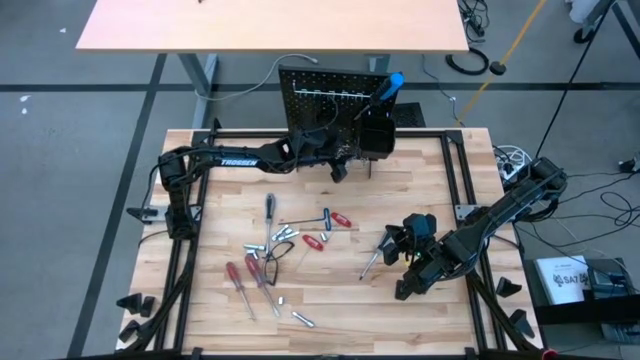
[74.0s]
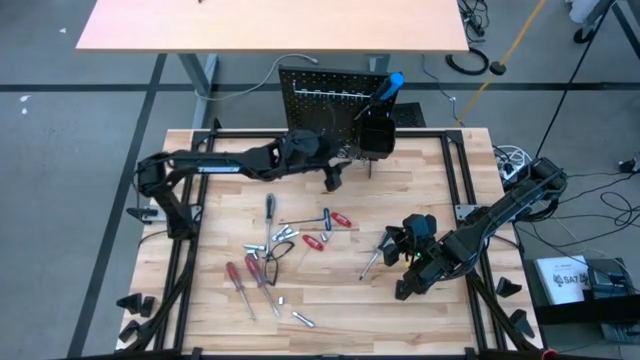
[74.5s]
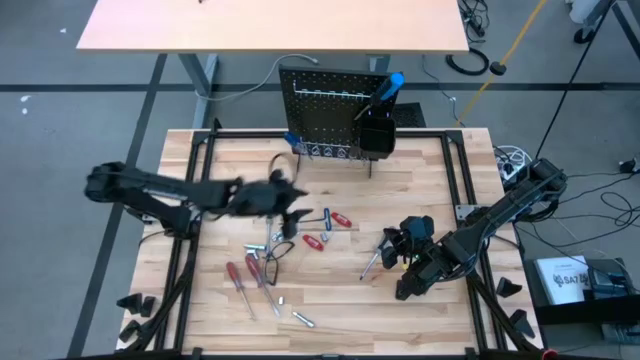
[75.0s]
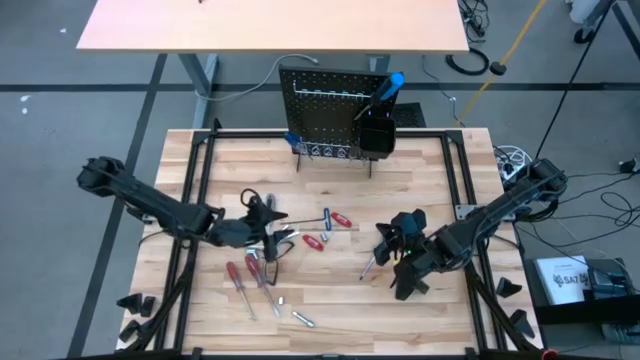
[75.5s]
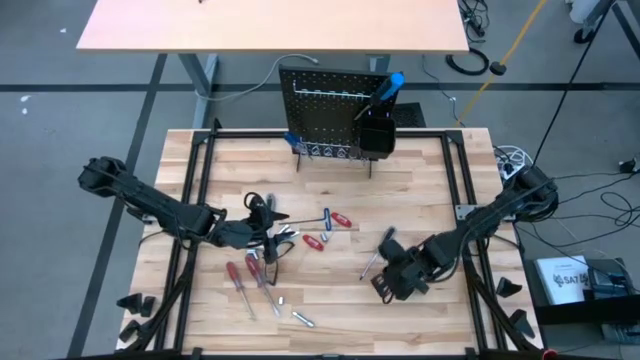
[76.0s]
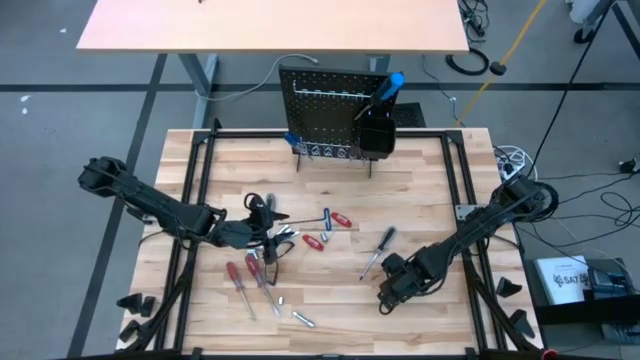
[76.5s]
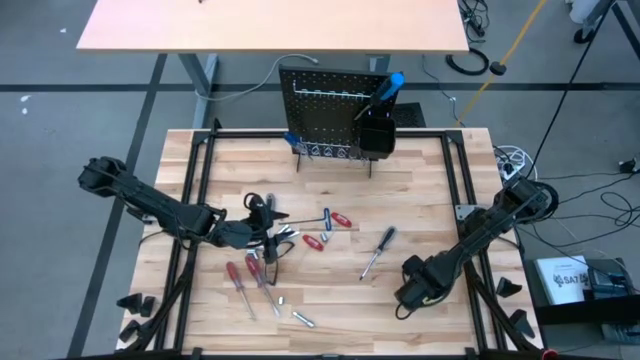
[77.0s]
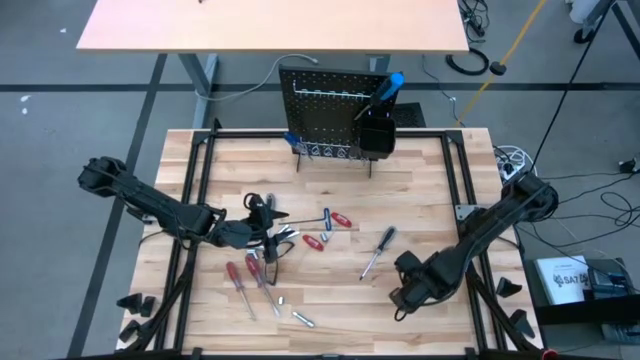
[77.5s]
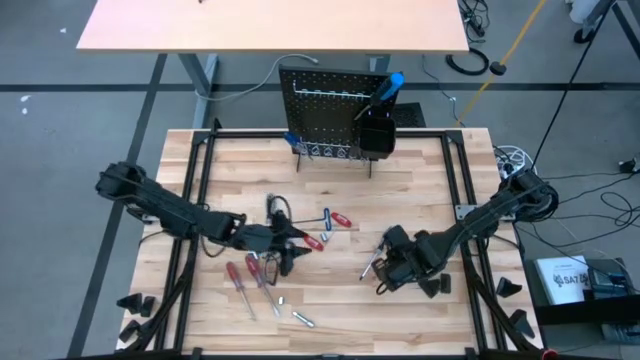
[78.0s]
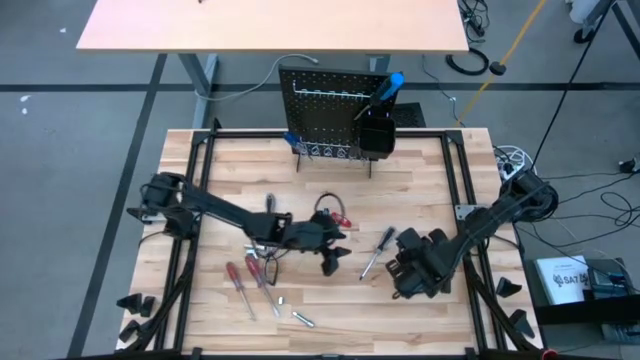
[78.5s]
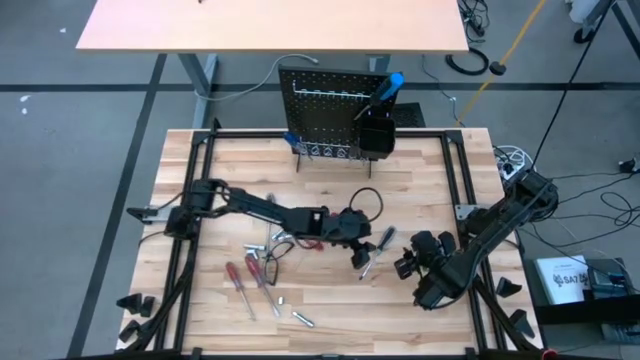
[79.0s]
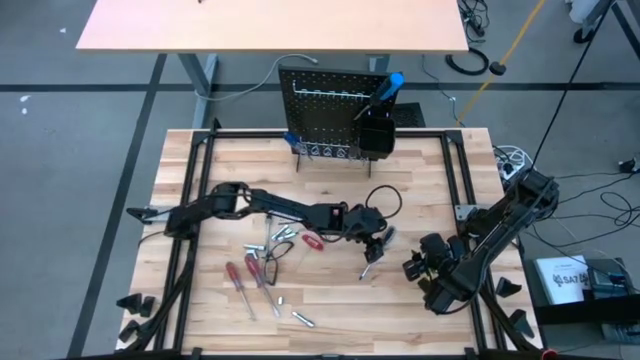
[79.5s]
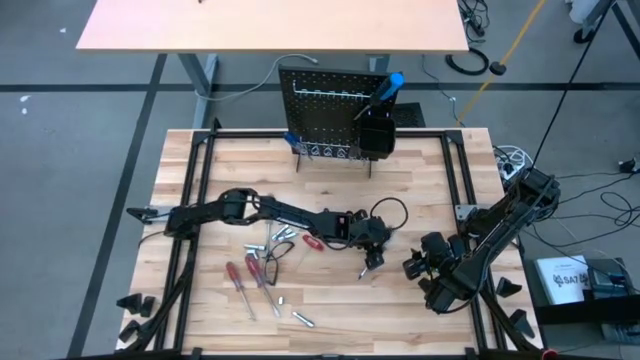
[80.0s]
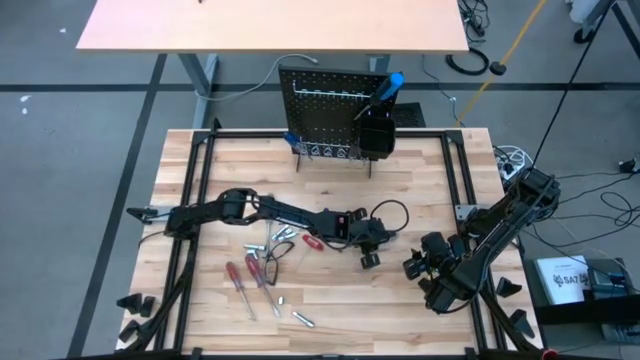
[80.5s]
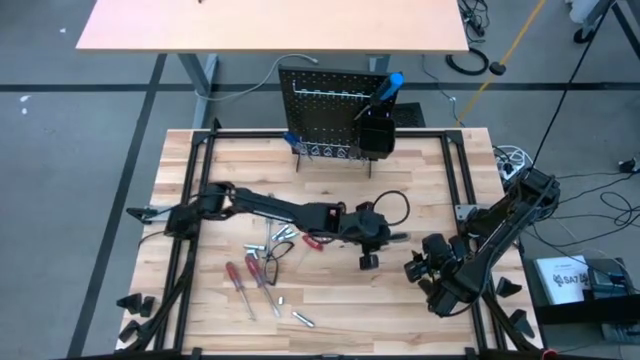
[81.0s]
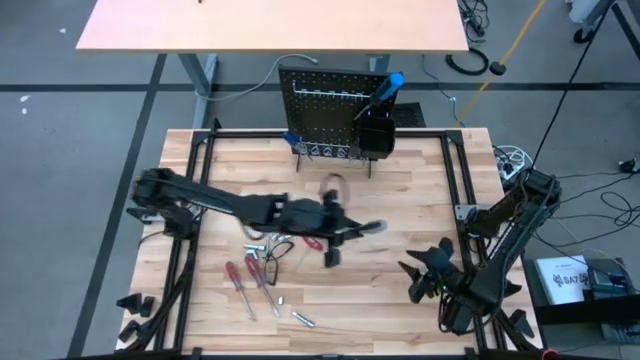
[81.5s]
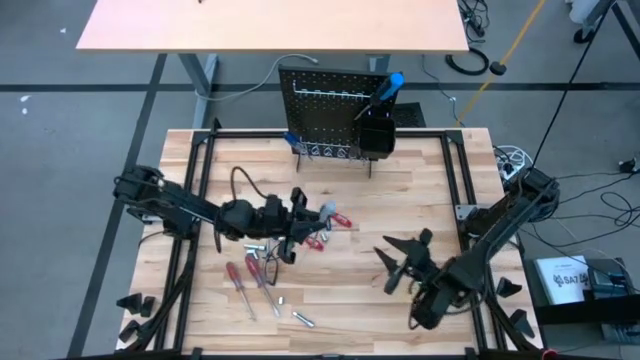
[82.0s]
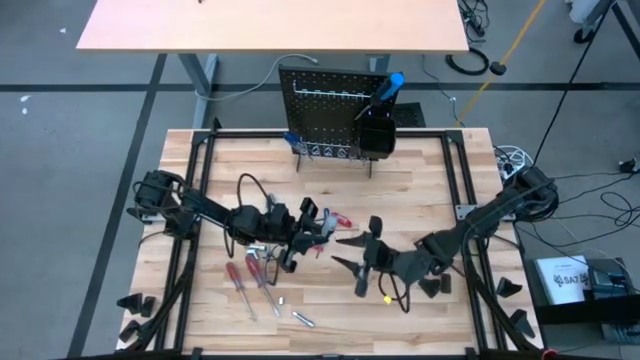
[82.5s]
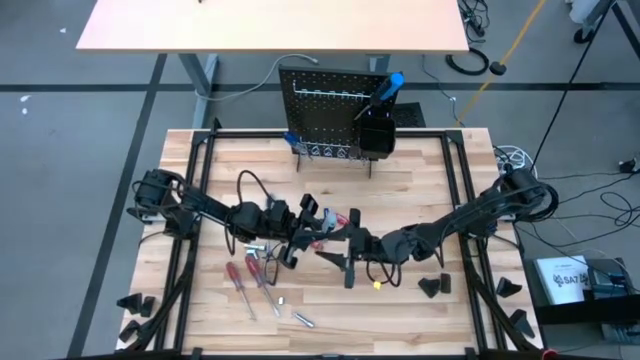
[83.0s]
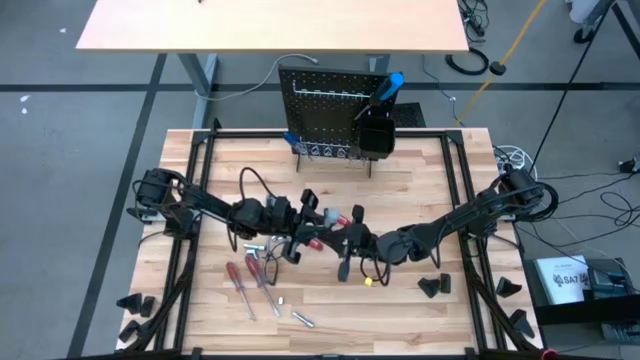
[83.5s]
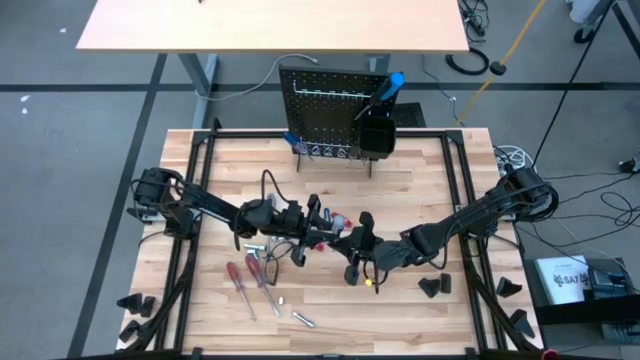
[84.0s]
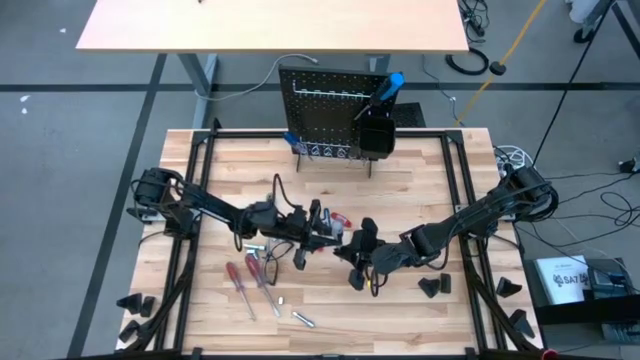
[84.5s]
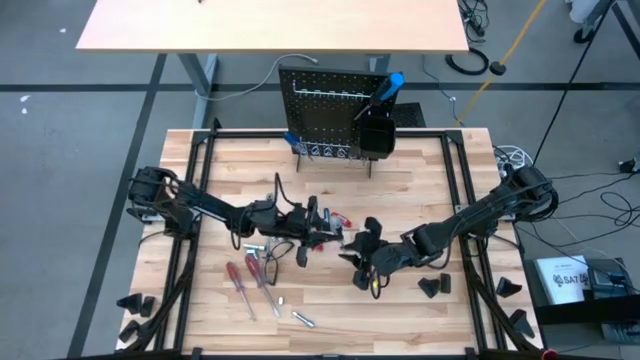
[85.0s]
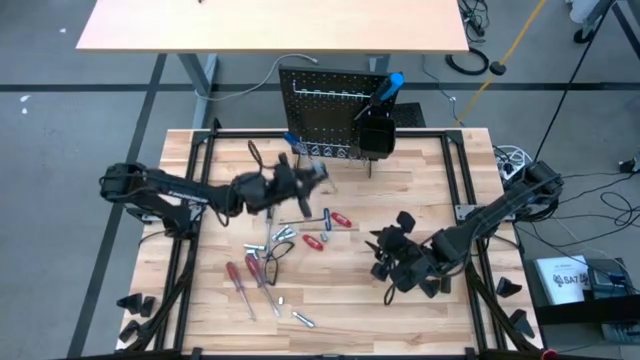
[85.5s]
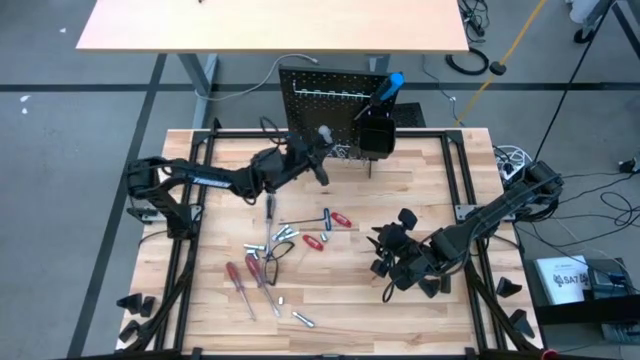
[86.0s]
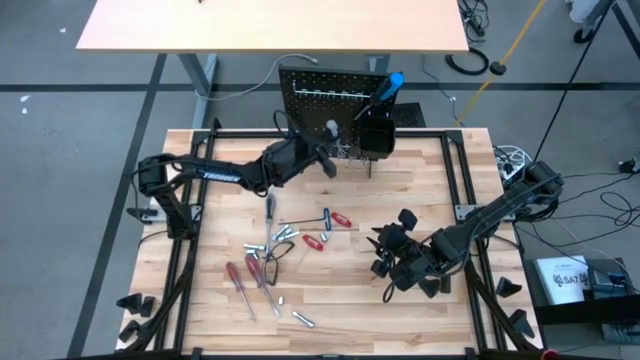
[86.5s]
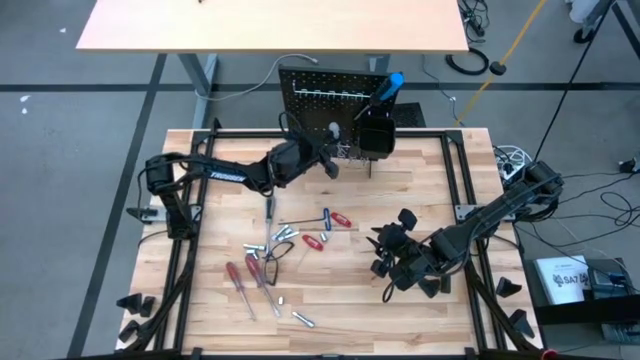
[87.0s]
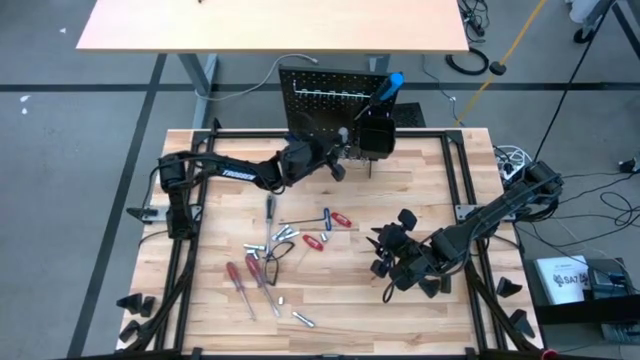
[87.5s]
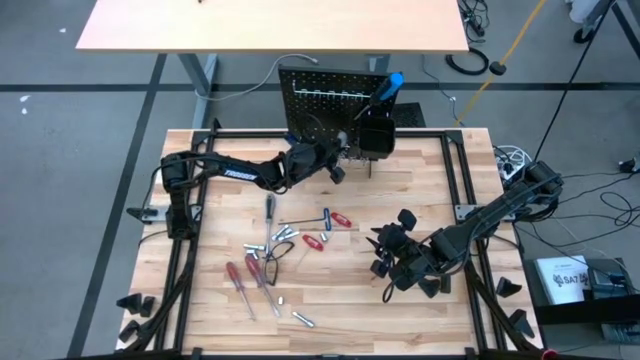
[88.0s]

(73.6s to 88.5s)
Task: Hang tools onto peg board
Hang the gray screwdriver onto the peg board

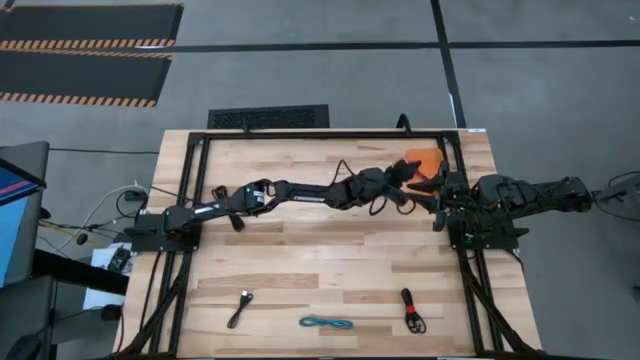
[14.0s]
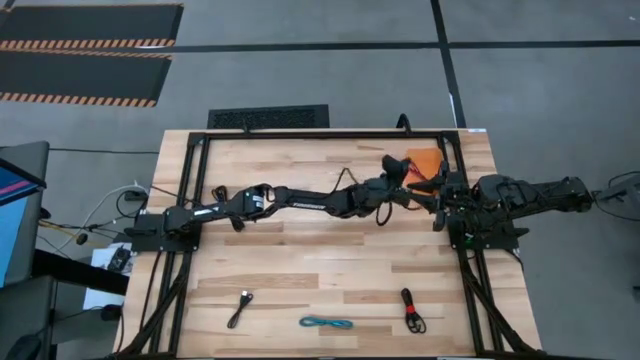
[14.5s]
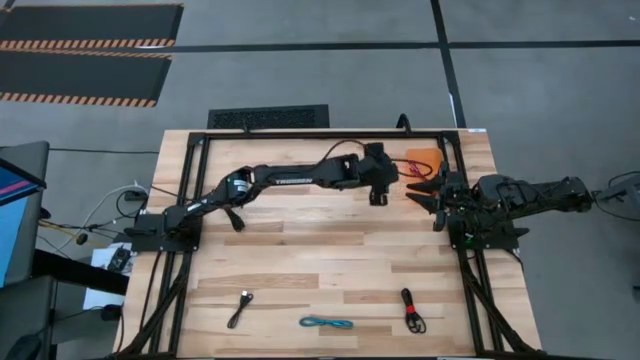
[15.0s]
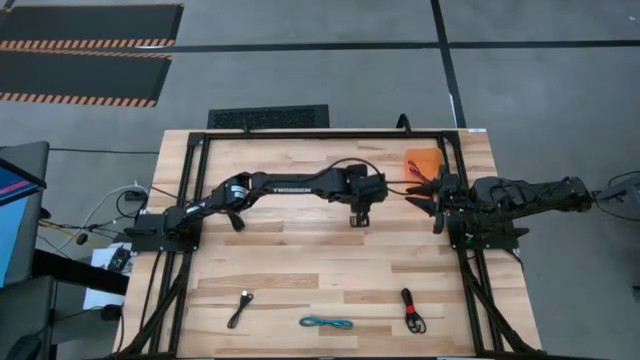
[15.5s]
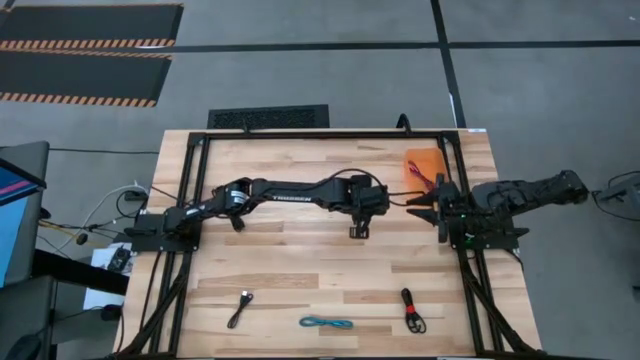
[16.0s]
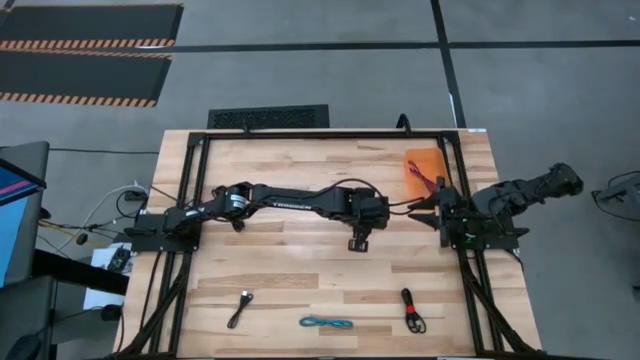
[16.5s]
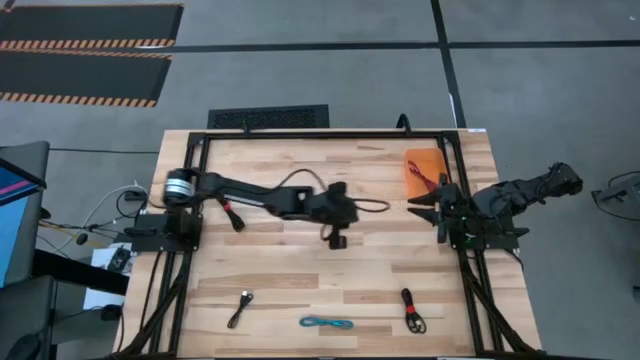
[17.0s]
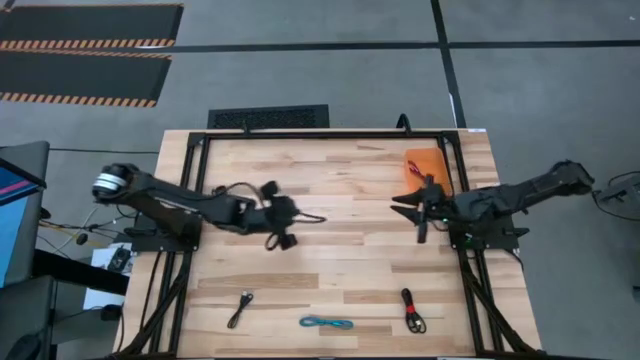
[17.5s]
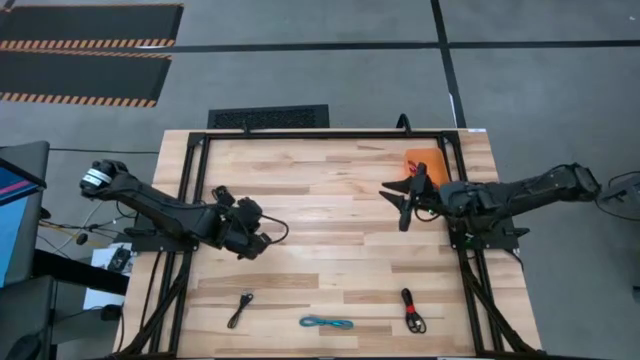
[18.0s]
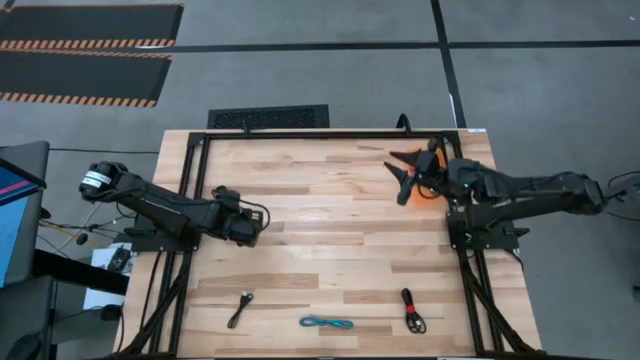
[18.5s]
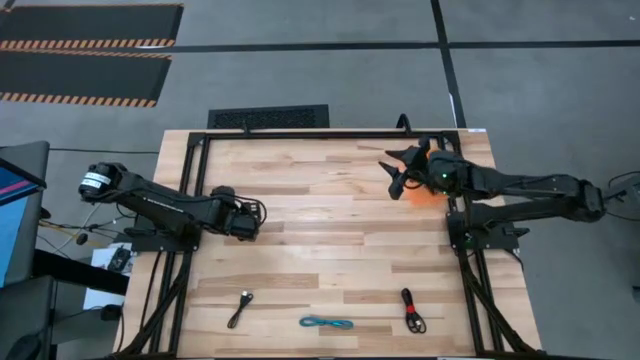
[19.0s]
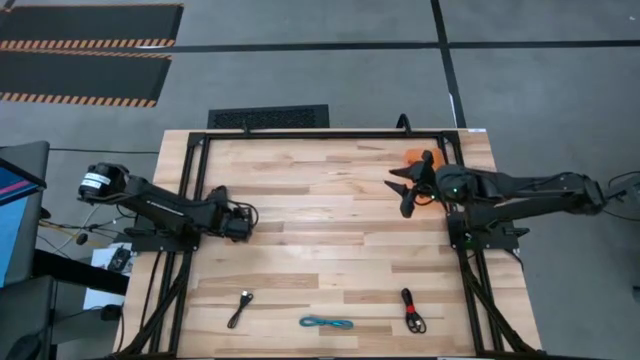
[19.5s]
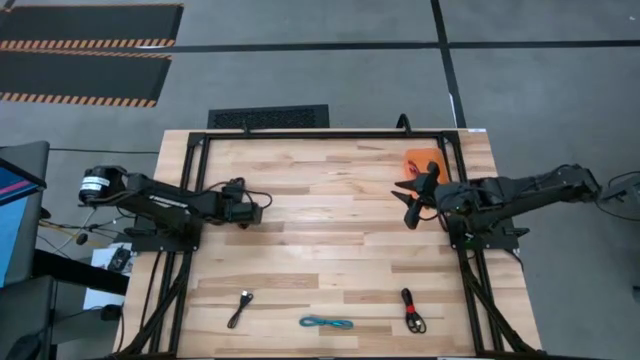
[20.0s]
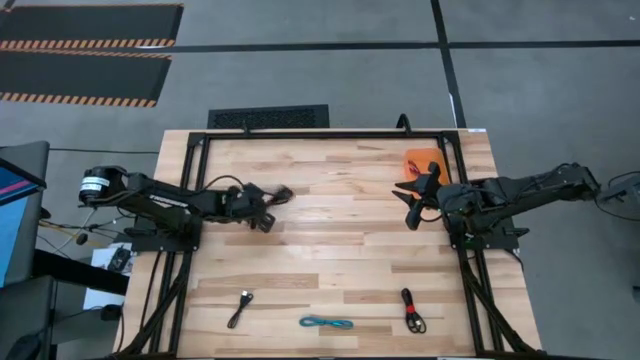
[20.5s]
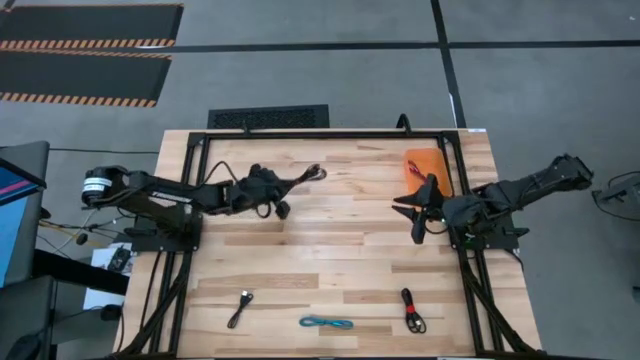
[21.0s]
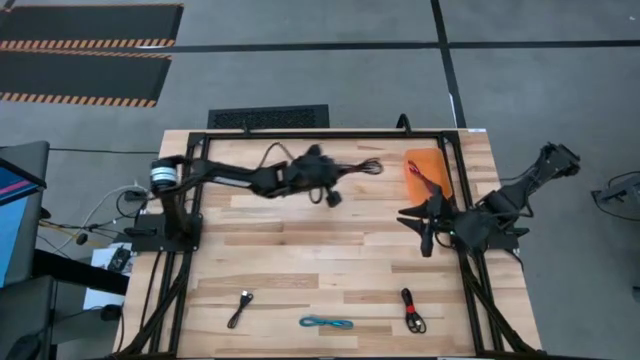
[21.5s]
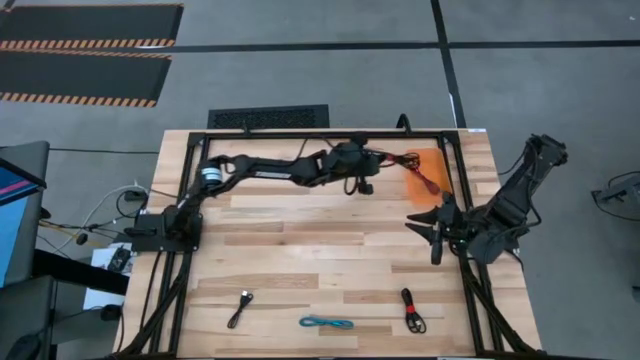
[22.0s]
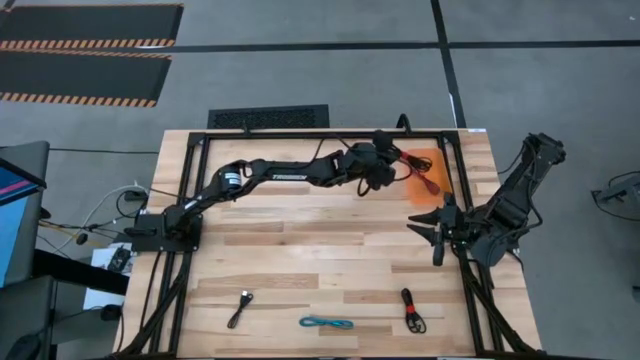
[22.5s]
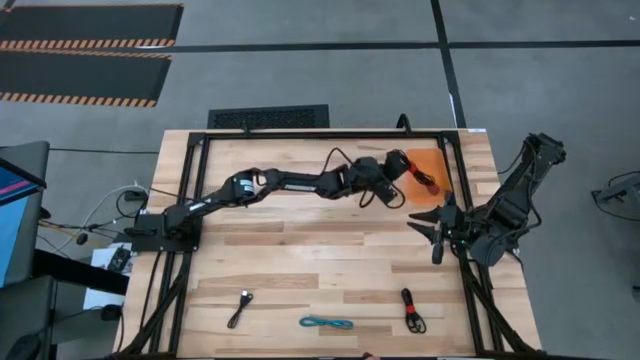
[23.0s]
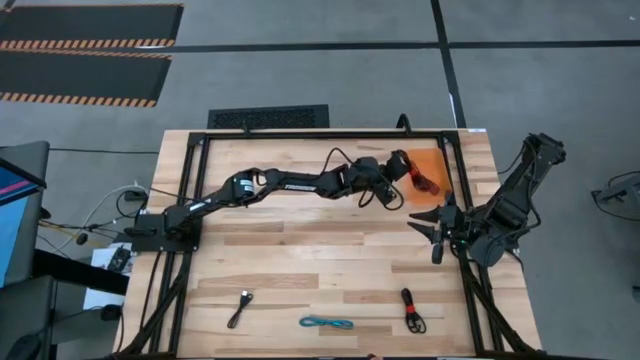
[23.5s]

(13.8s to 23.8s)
Task: Pick and place USB-C Cables
Put the top black charger cable into the orange bin
